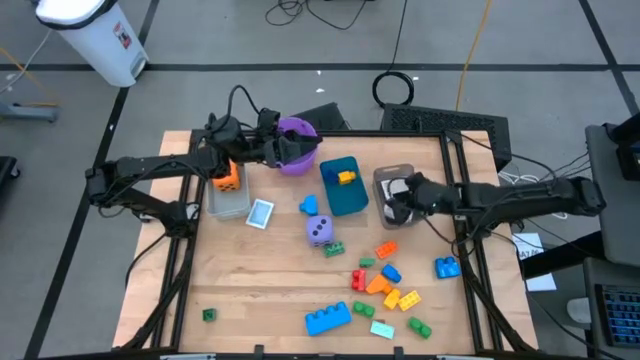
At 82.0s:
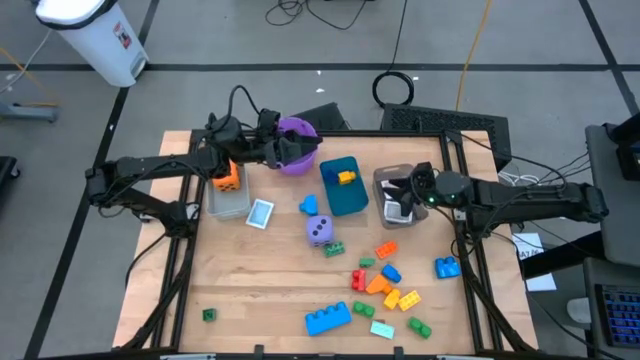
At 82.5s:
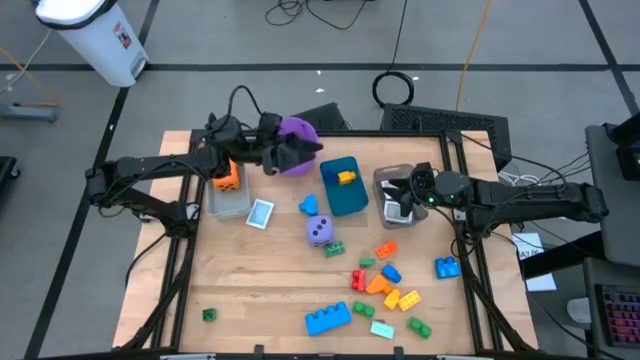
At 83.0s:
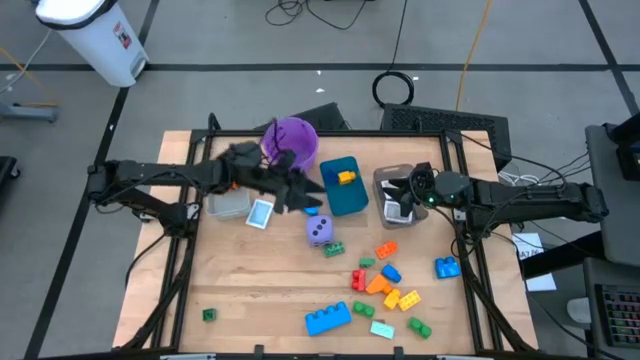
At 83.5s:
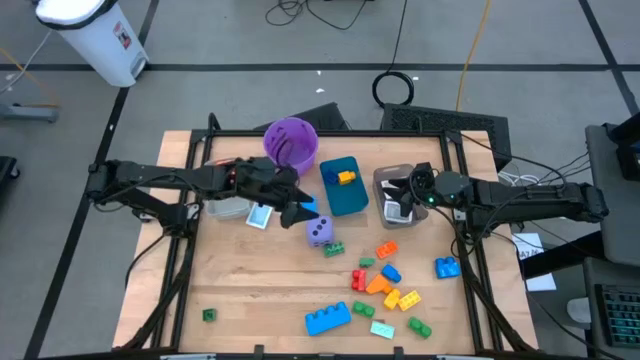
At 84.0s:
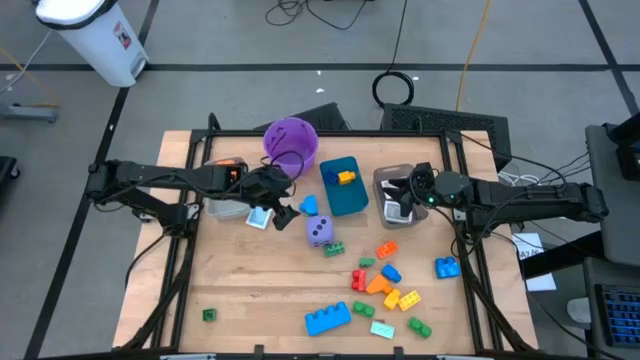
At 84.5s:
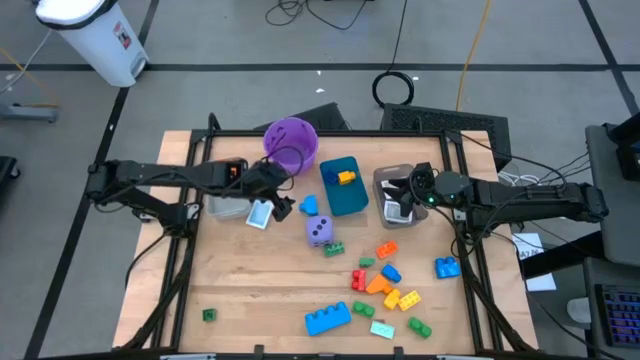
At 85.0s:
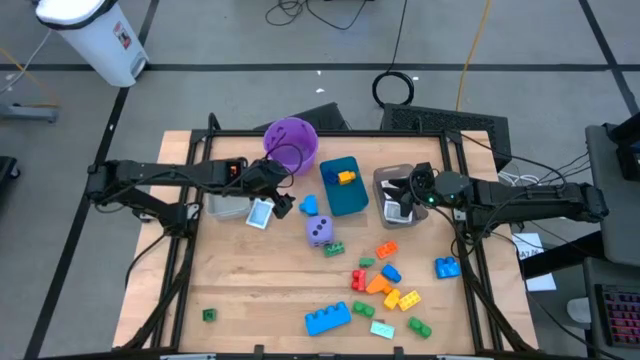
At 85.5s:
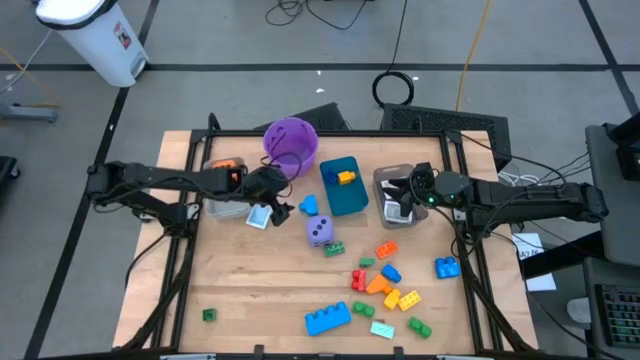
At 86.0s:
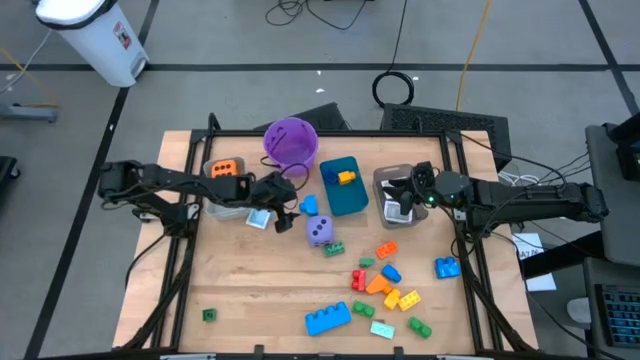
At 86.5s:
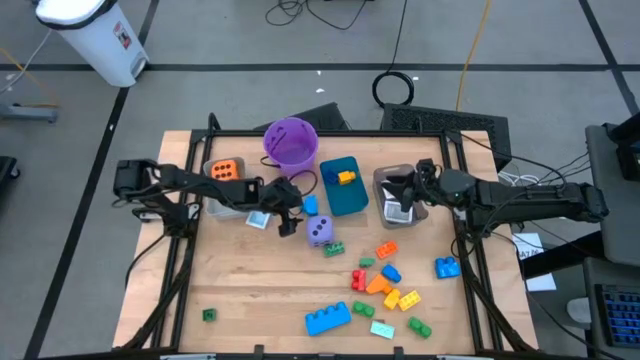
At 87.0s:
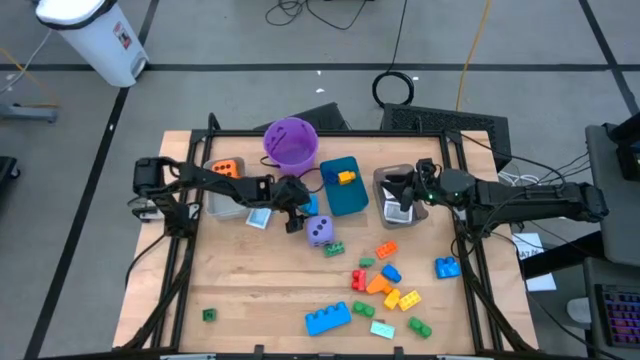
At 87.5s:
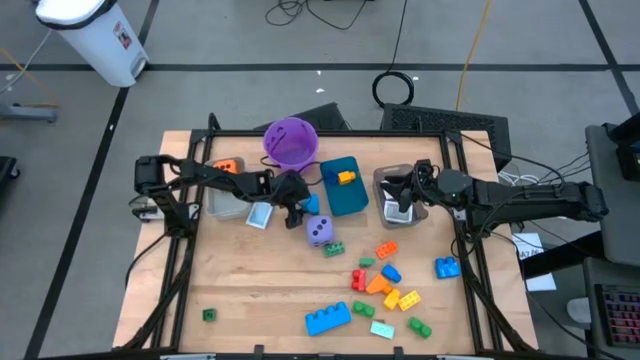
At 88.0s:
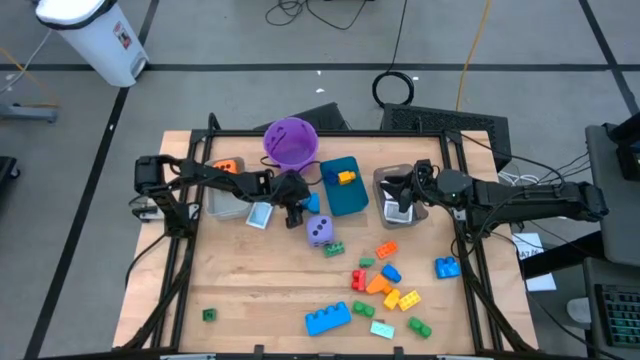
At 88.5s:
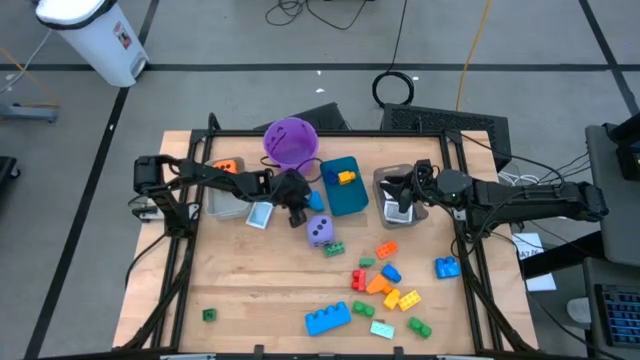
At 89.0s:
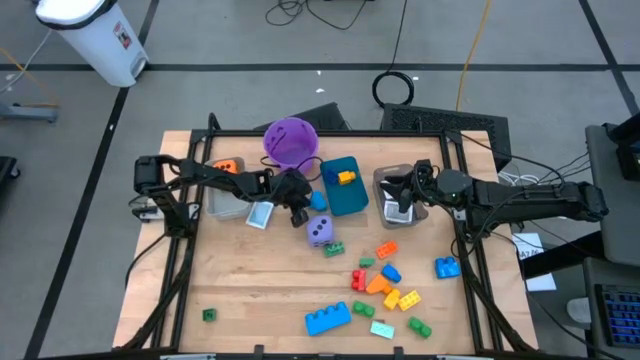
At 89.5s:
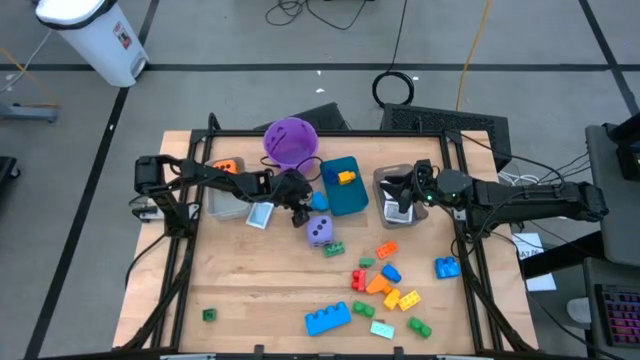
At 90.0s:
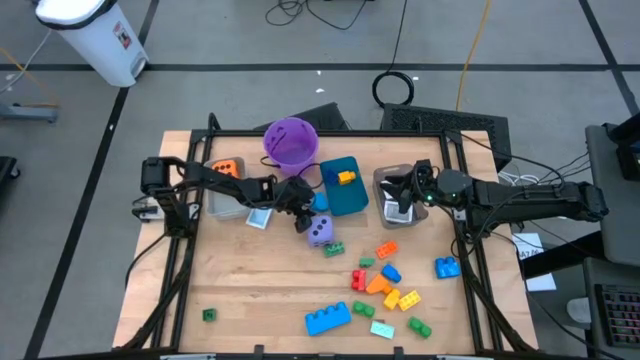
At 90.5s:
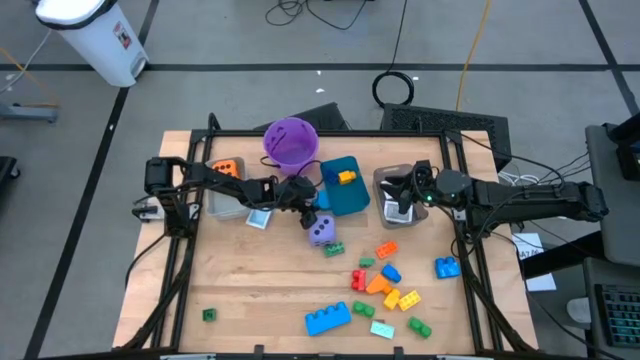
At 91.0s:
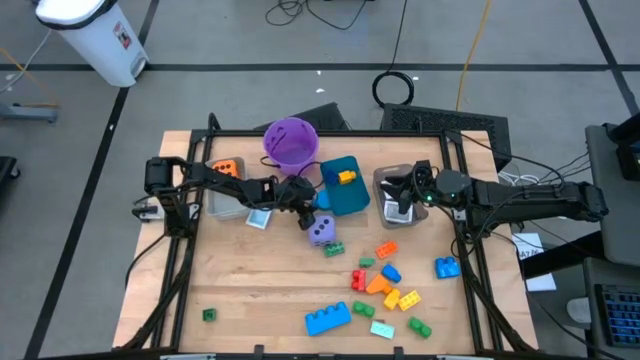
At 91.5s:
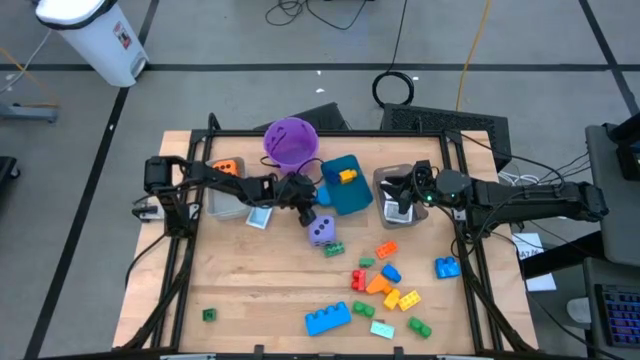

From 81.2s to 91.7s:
Task: Pick & Place Toys
Put the blue game piece into the blue bin

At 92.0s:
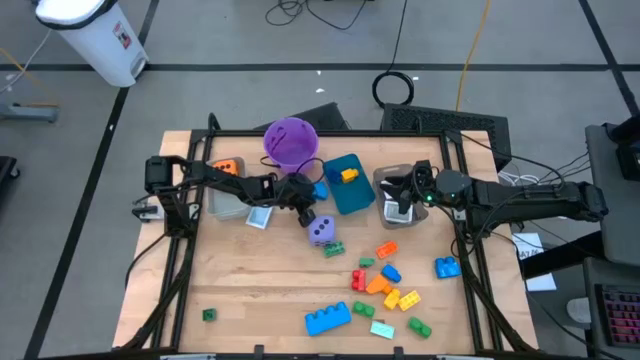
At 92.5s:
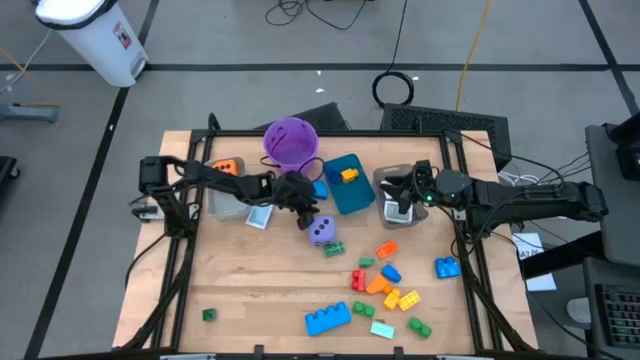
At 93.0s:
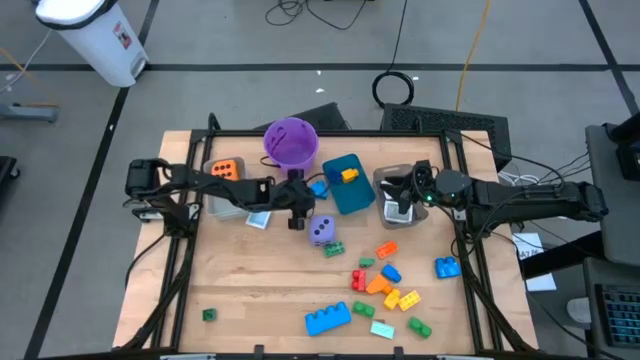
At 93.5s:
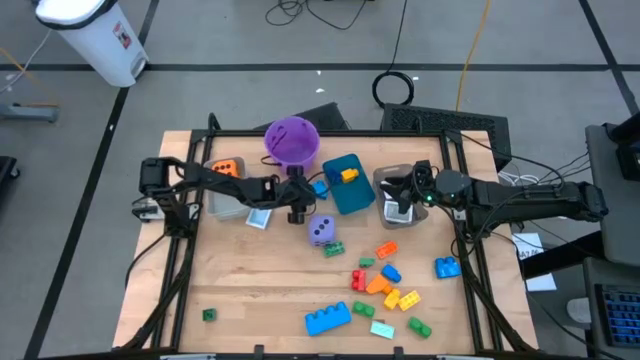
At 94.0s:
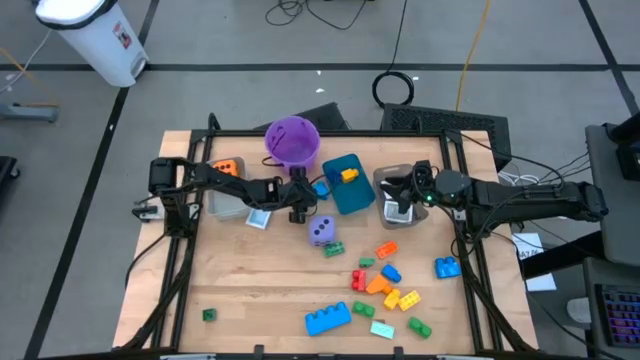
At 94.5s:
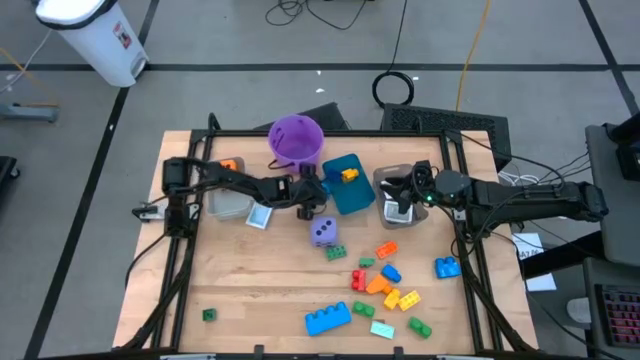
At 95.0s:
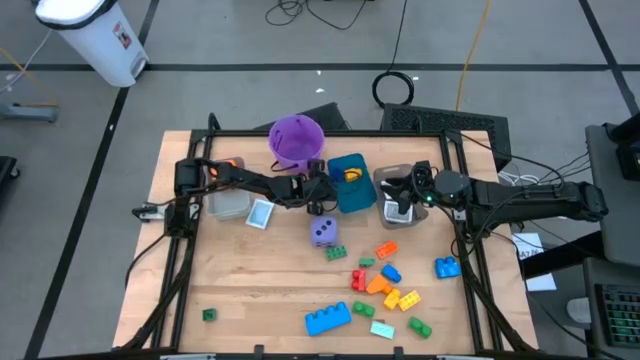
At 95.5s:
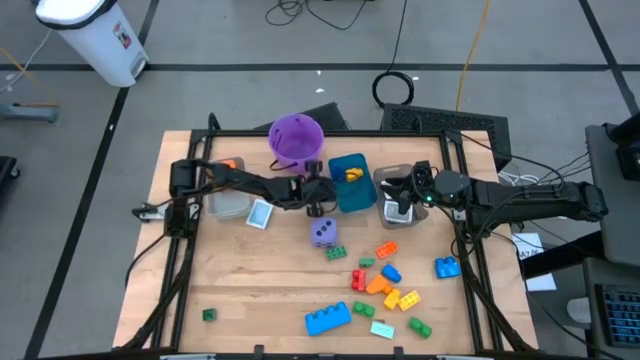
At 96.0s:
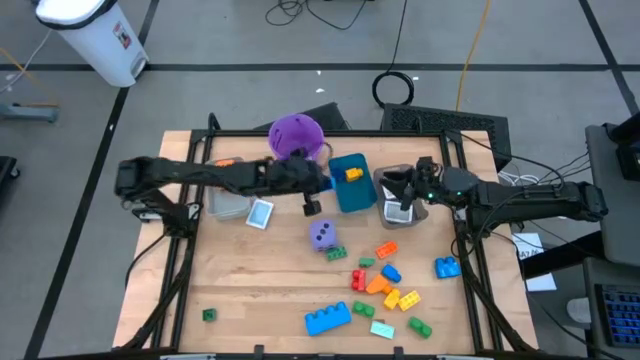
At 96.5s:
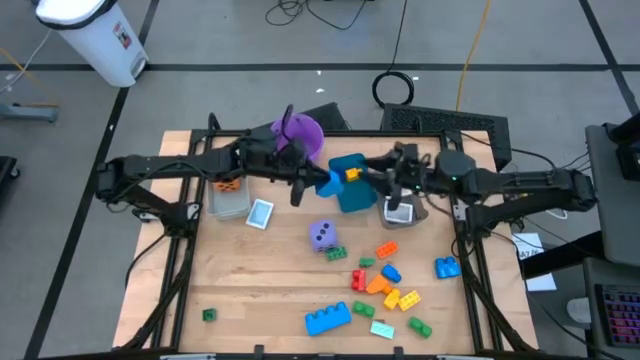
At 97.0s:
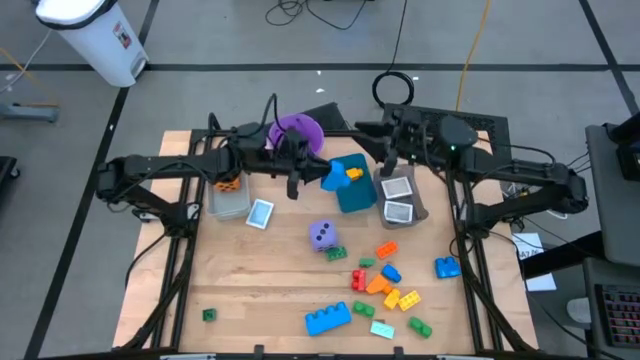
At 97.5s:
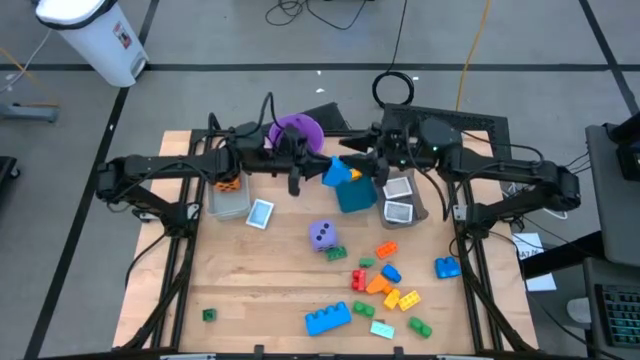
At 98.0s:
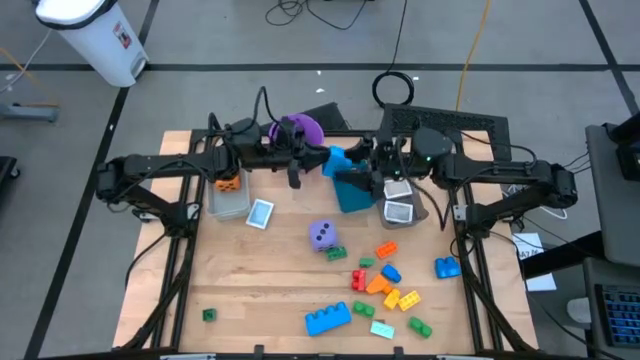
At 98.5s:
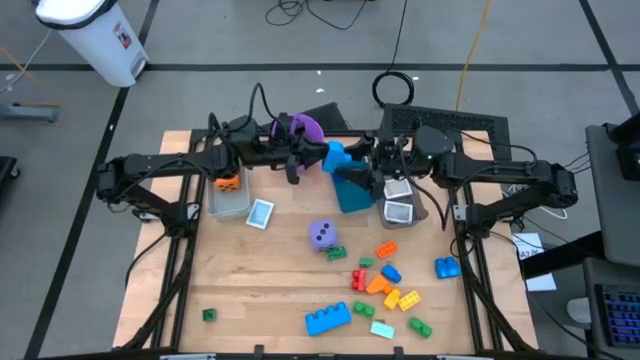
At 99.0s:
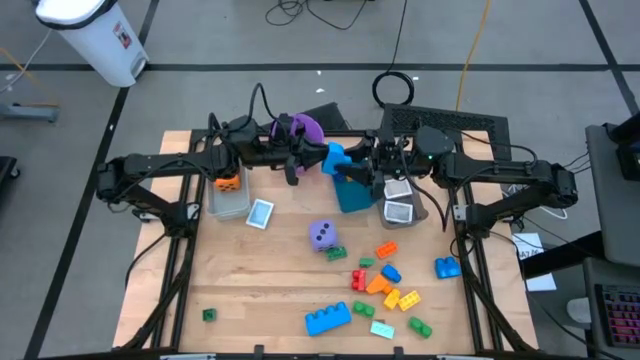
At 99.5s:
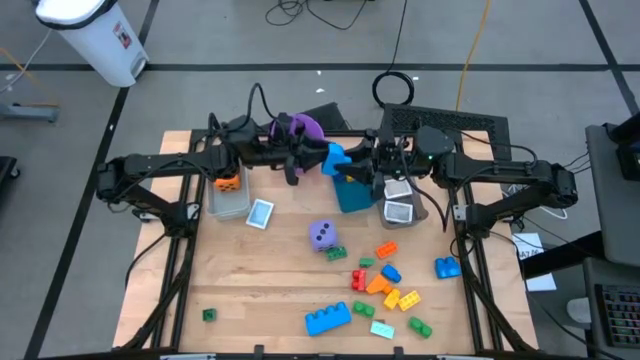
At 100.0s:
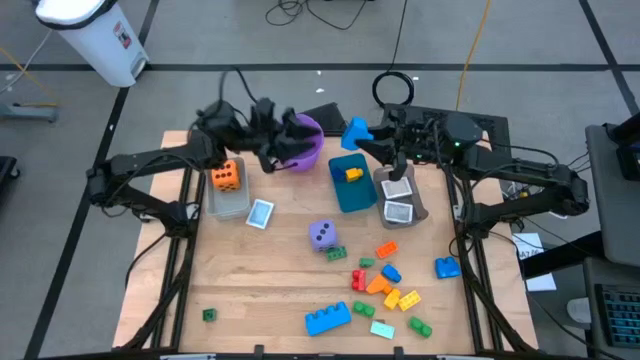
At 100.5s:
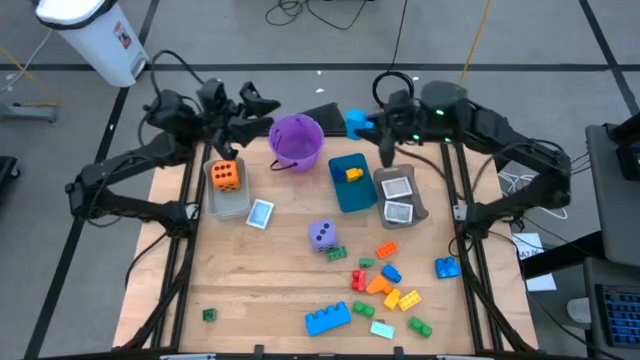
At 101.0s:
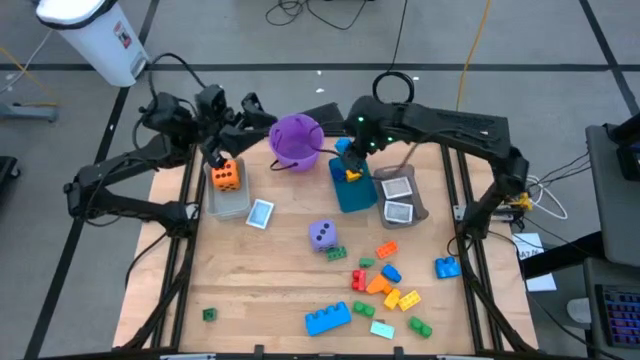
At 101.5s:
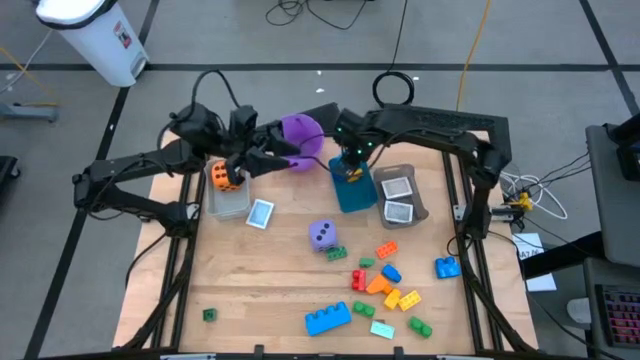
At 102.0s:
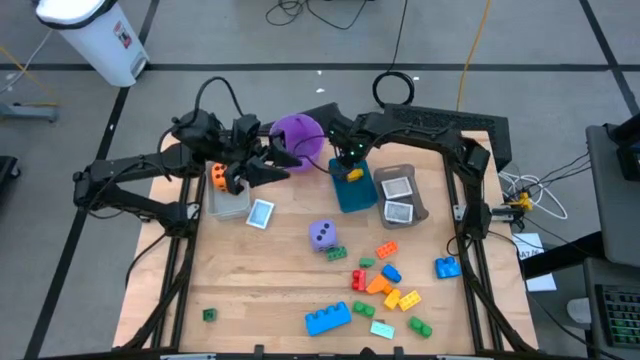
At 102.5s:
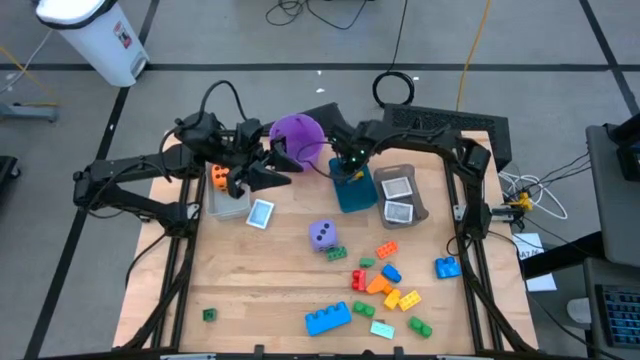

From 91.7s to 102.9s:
Put the blue game piece into the blue bin
